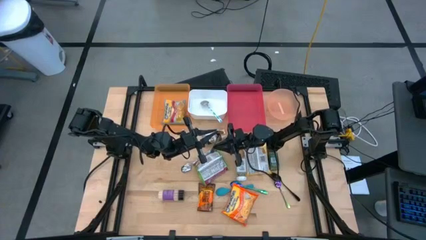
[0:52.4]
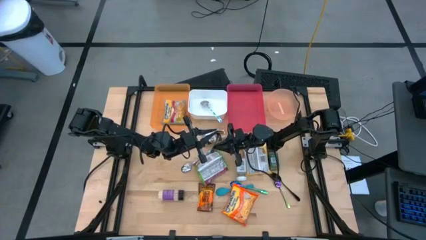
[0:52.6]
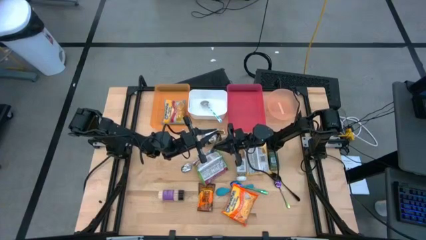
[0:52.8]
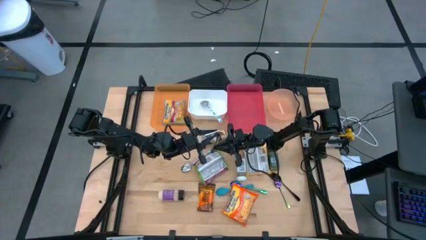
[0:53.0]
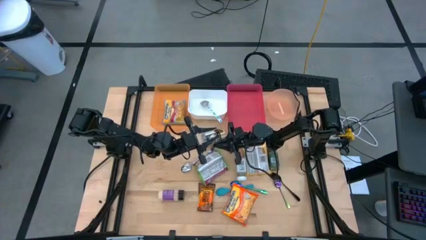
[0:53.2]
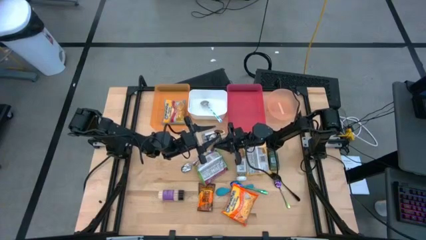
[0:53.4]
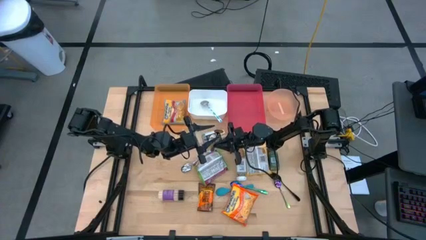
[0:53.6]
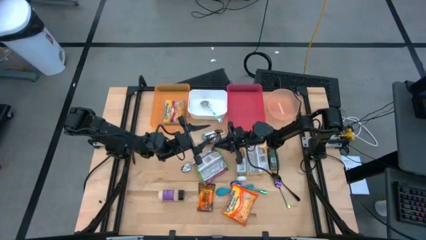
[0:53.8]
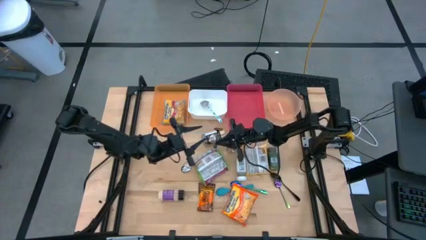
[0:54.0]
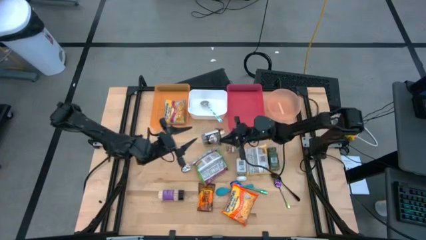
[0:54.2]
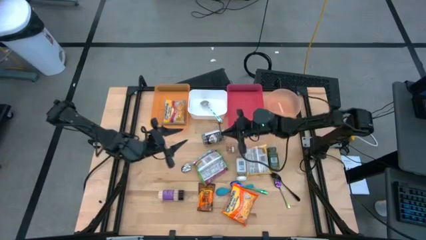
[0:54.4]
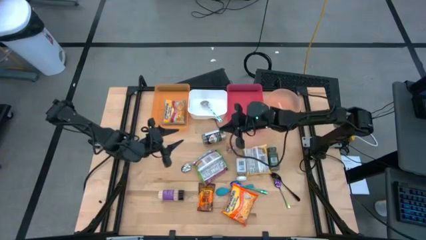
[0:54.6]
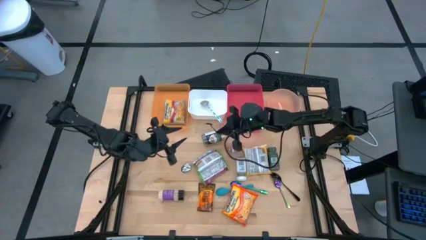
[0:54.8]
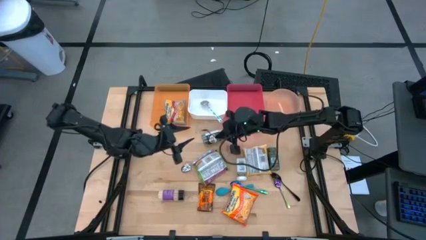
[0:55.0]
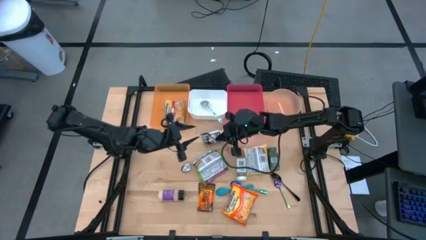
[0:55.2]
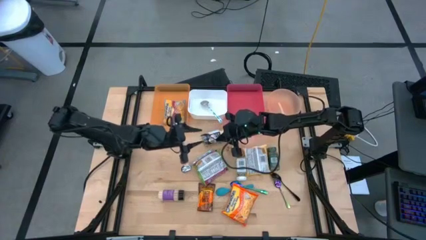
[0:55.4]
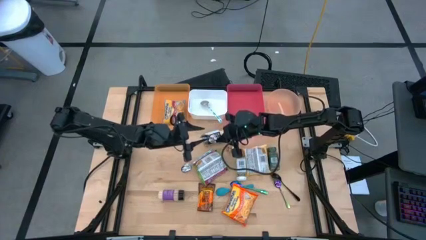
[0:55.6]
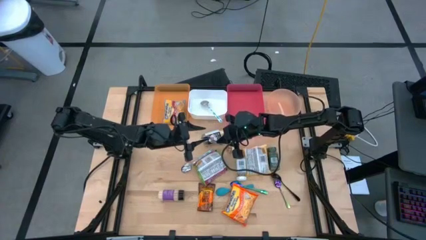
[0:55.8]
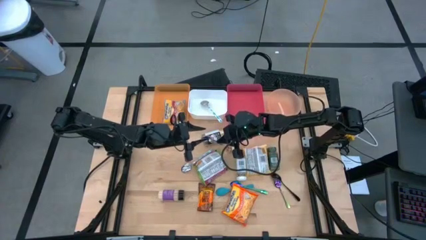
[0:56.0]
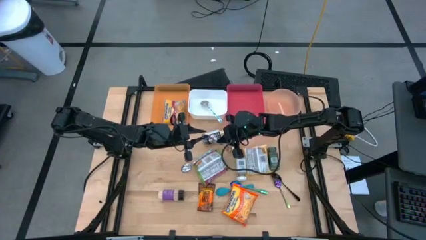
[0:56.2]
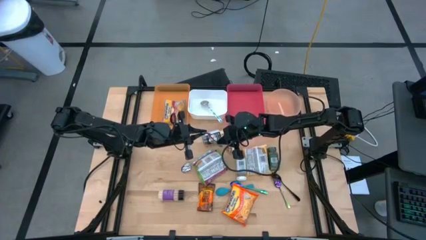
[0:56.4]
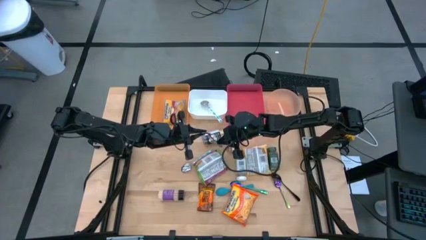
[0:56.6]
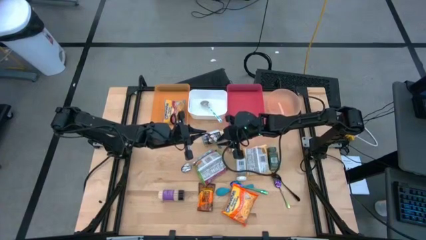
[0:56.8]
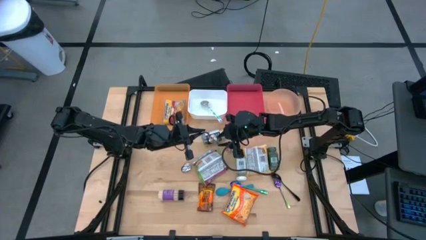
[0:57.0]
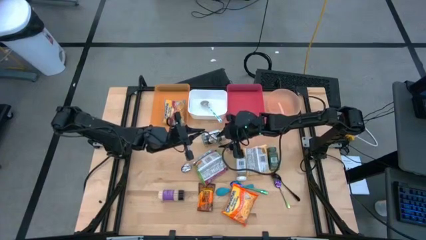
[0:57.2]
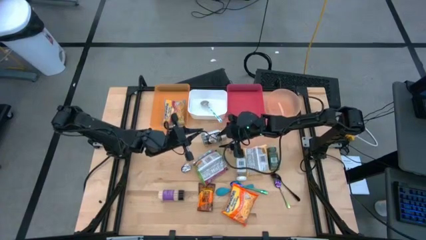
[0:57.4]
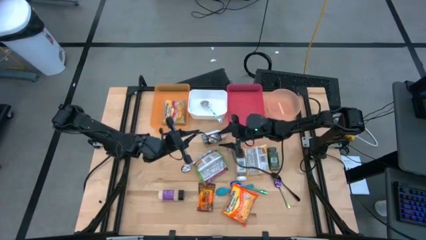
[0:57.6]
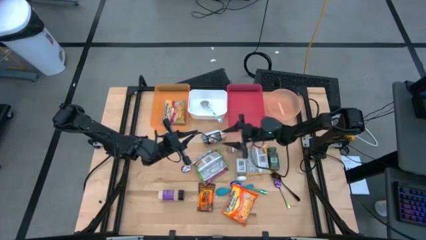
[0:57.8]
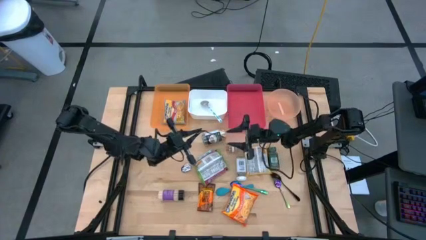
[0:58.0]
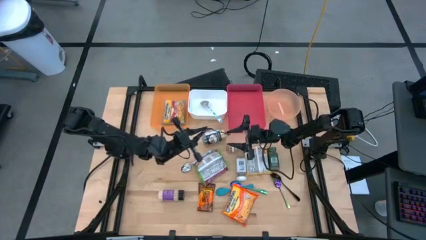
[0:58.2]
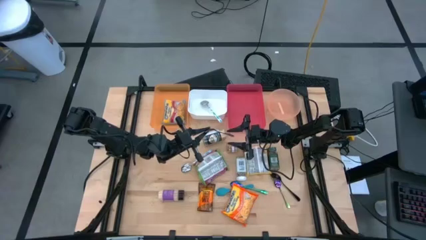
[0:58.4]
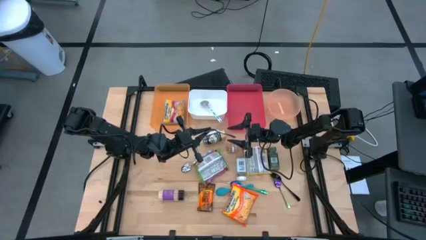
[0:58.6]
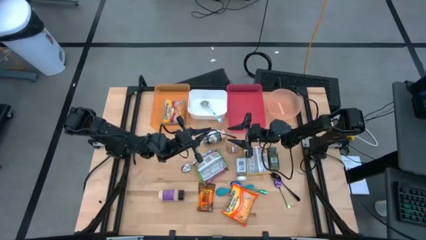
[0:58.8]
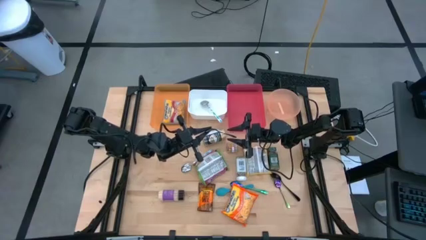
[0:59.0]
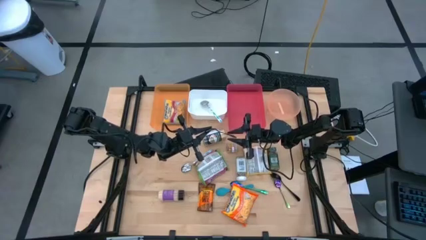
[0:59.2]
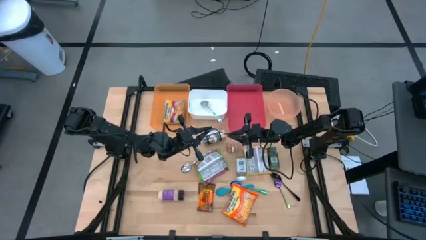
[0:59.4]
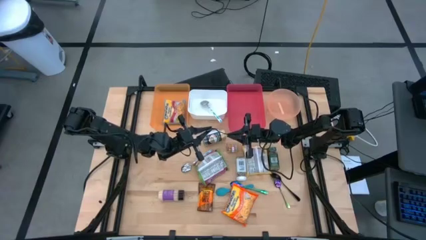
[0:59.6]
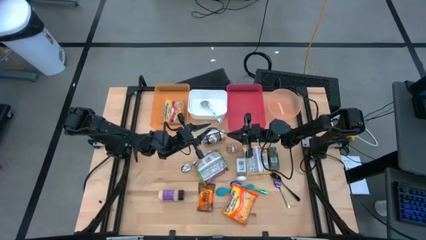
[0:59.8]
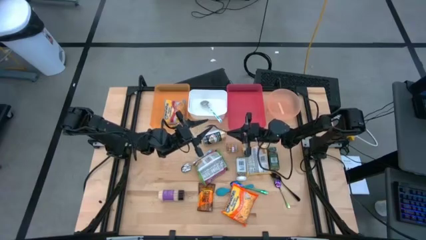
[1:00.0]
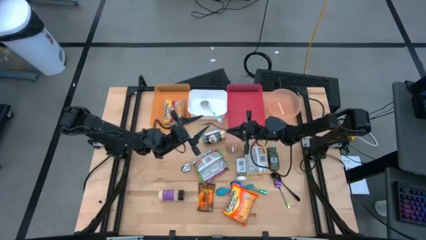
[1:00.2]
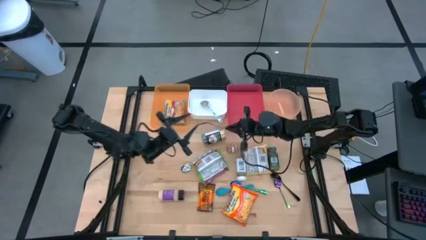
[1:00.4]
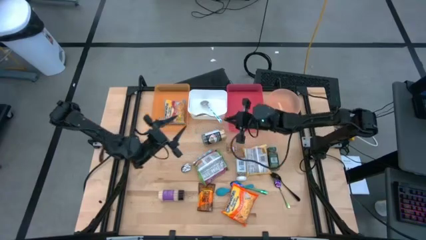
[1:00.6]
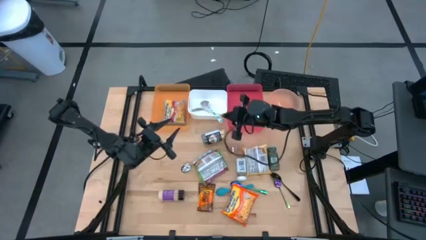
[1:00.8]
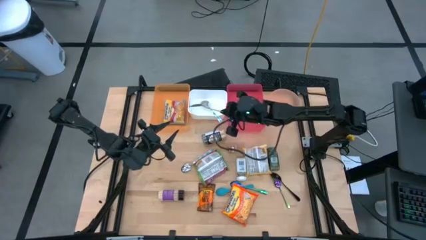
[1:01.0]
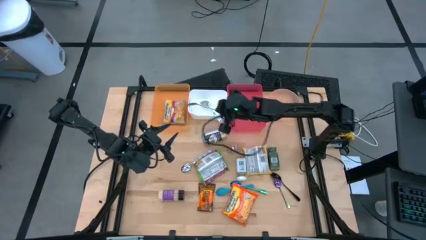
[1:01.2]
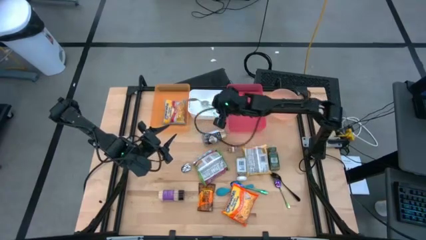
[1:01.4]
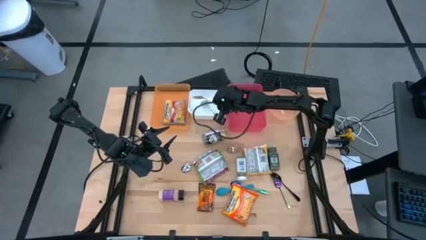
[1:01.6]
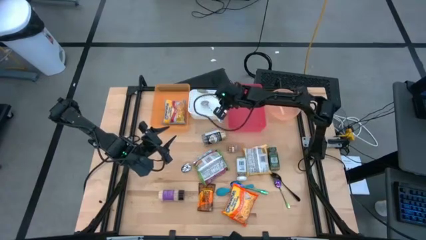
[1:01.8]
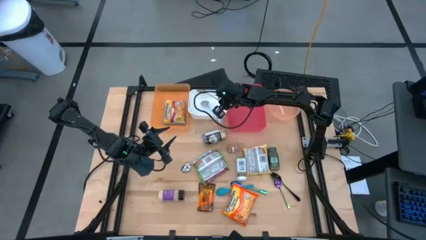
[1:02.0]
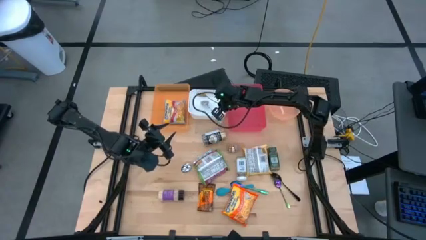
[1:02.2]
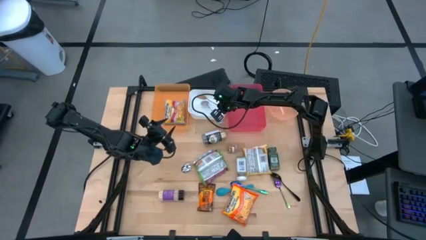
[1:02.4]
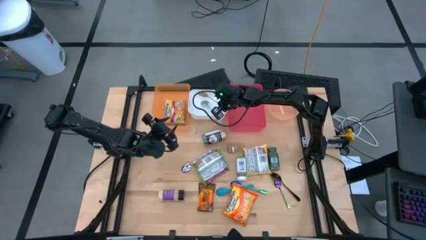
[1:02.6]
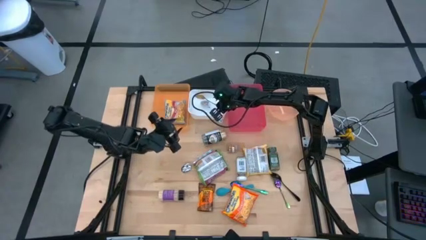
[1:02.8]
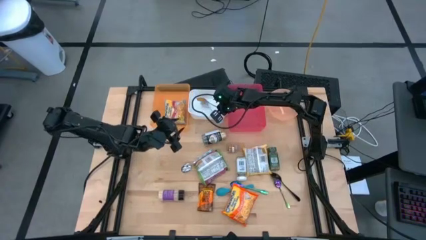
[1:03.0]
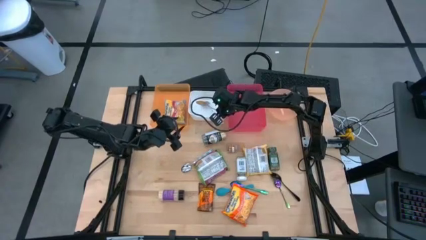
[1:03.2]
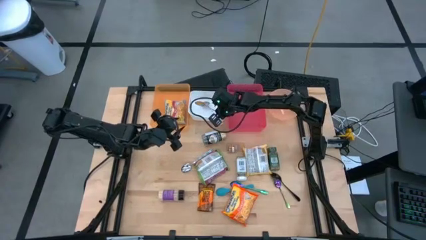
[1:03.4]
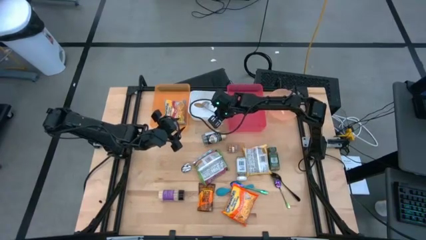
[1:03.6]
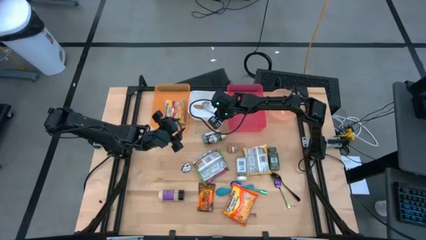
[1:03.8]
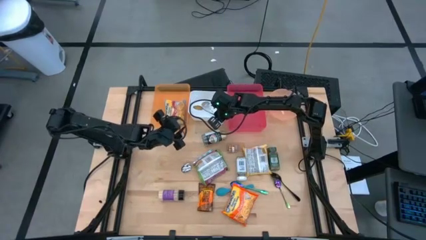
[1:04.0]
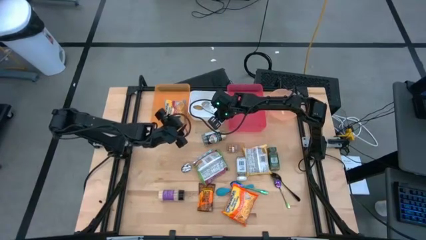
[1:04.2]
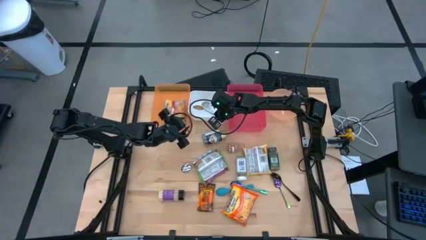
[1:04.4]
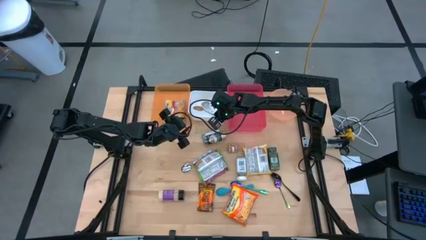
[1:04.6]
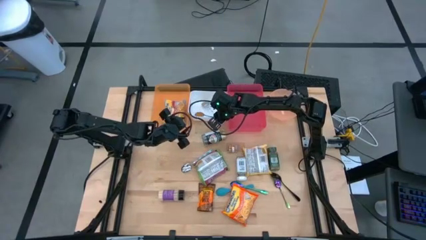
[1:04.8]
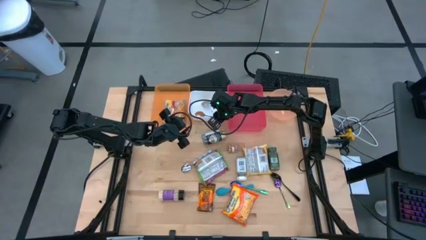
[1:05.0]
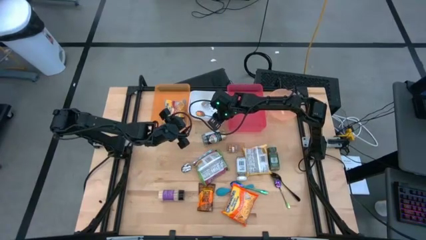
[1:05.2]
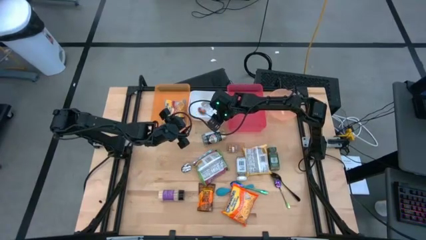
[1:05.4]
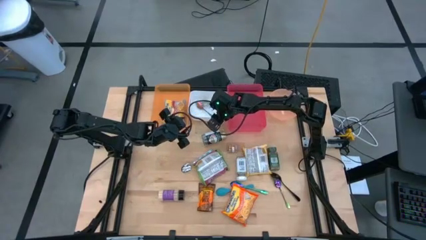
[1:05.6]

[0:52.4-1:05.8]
Task: Pick & Place Food Item
Put the left purple spoon into the white bin
